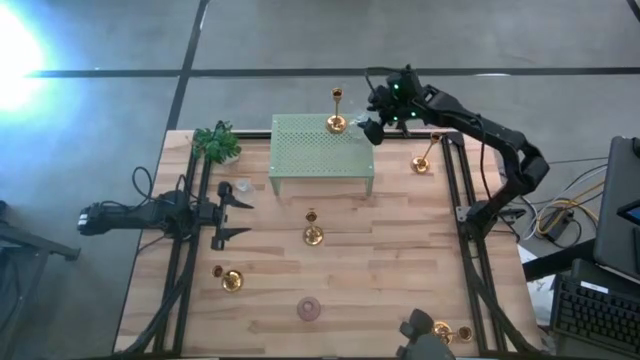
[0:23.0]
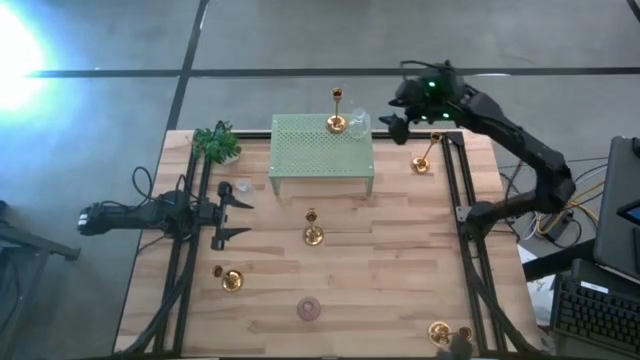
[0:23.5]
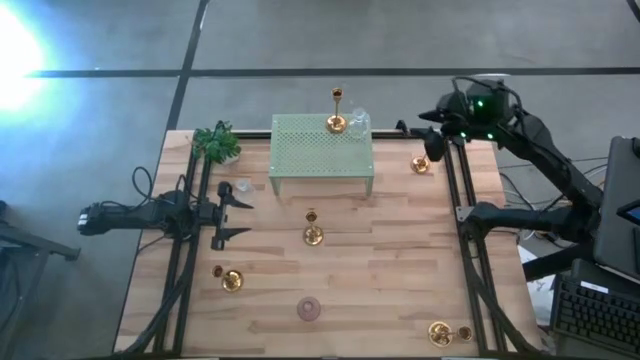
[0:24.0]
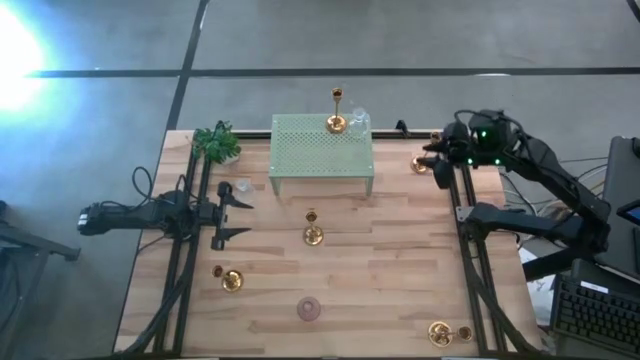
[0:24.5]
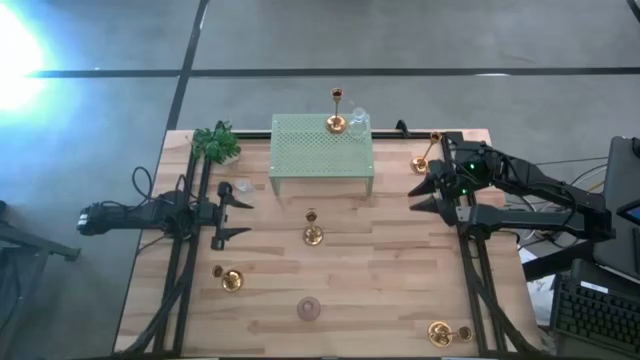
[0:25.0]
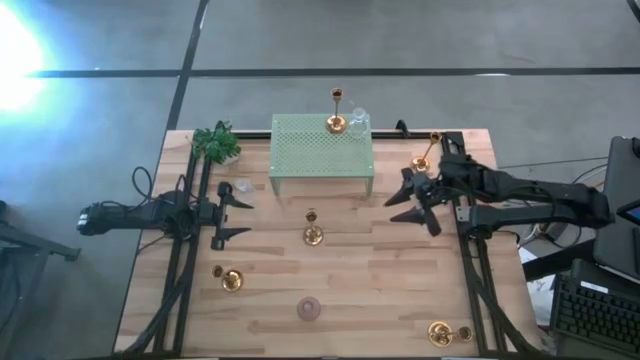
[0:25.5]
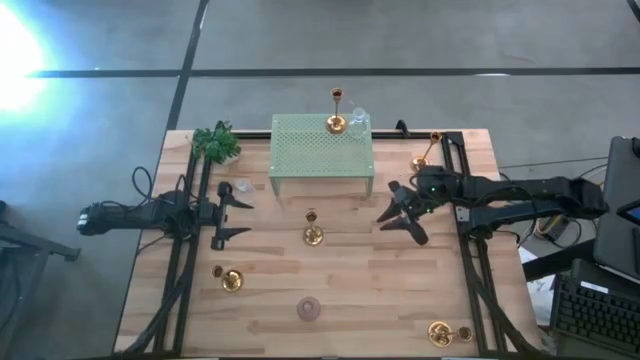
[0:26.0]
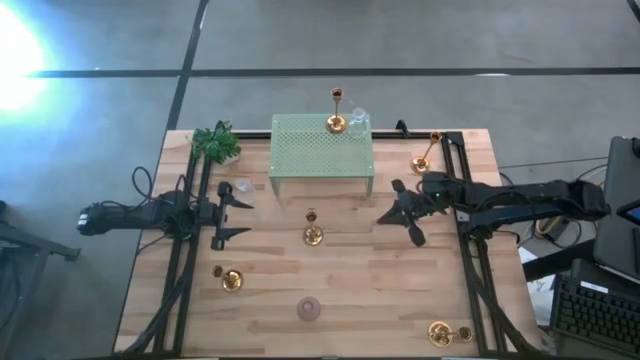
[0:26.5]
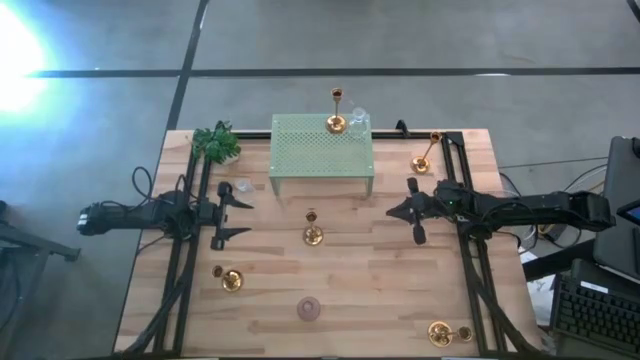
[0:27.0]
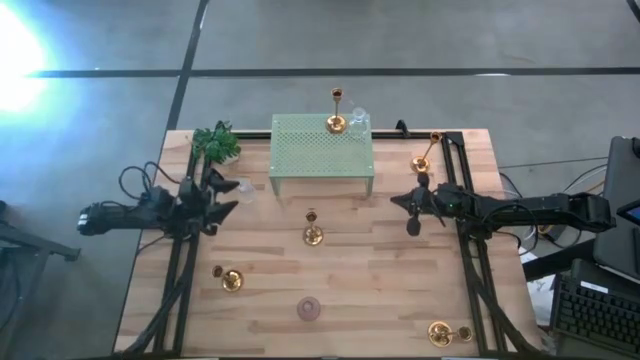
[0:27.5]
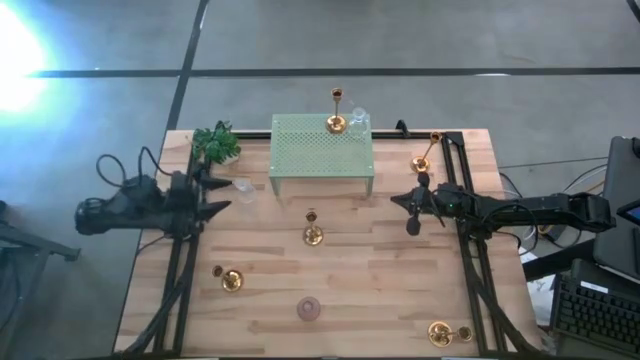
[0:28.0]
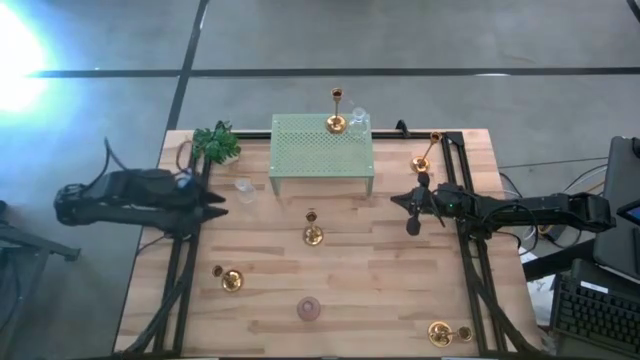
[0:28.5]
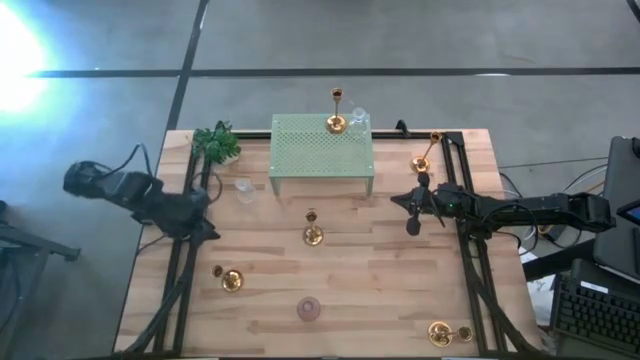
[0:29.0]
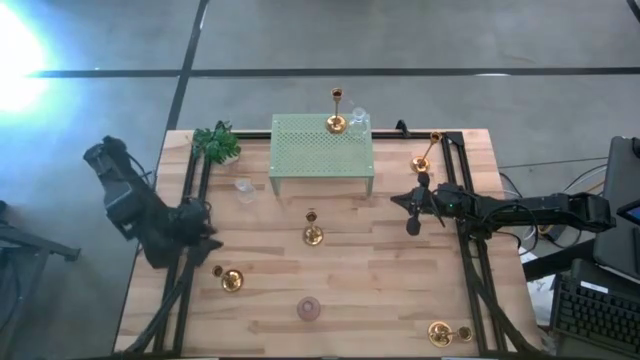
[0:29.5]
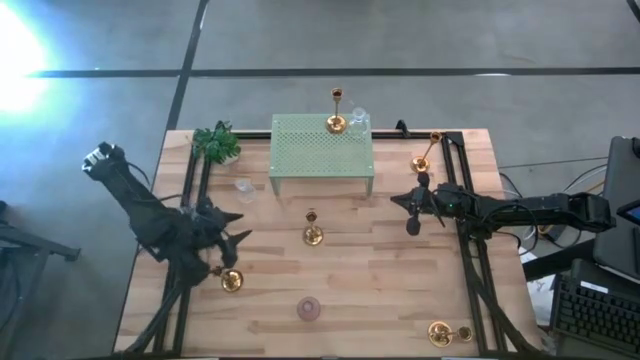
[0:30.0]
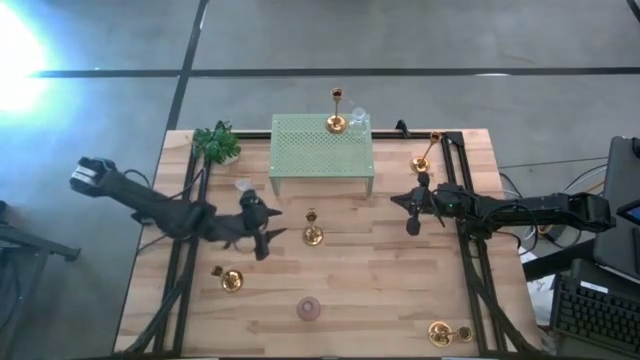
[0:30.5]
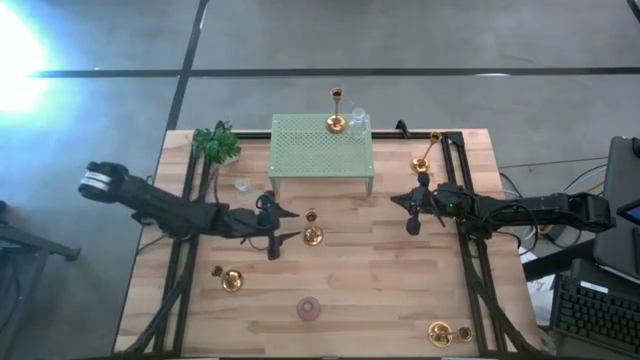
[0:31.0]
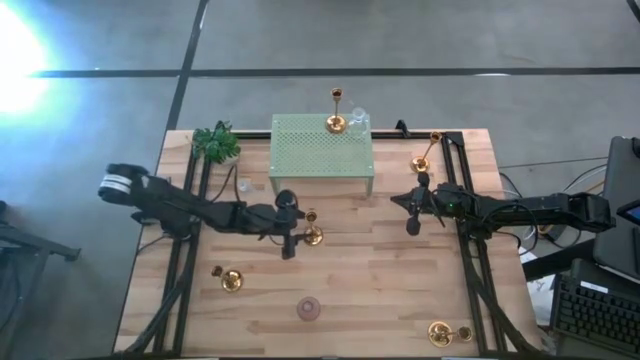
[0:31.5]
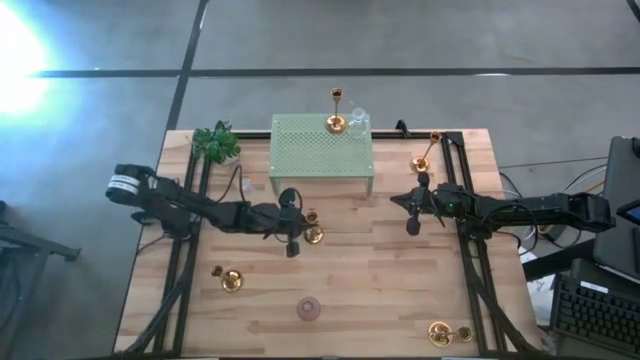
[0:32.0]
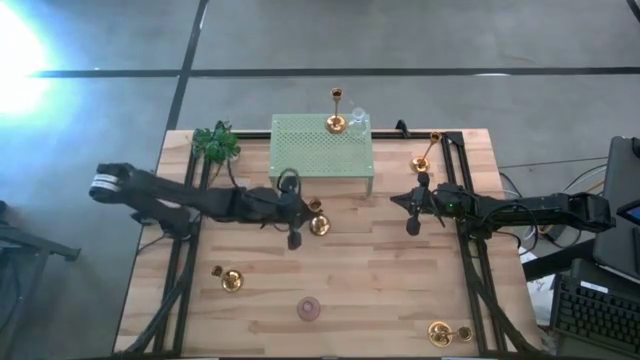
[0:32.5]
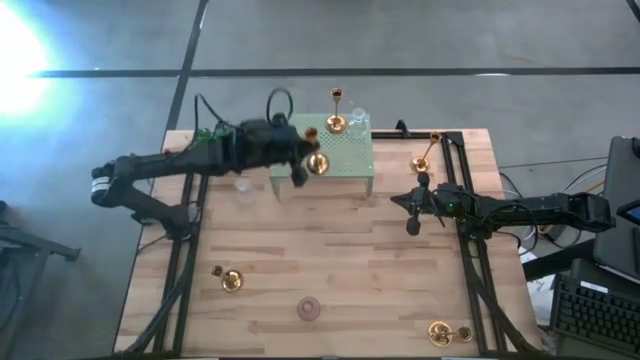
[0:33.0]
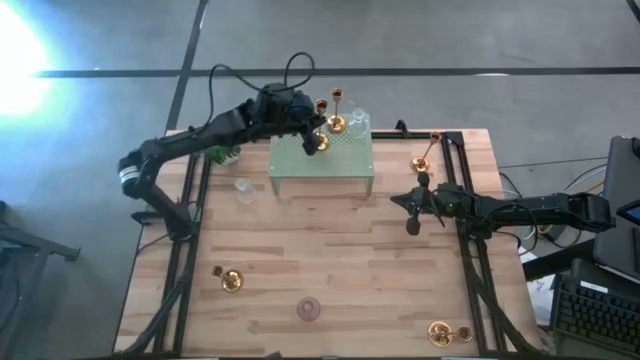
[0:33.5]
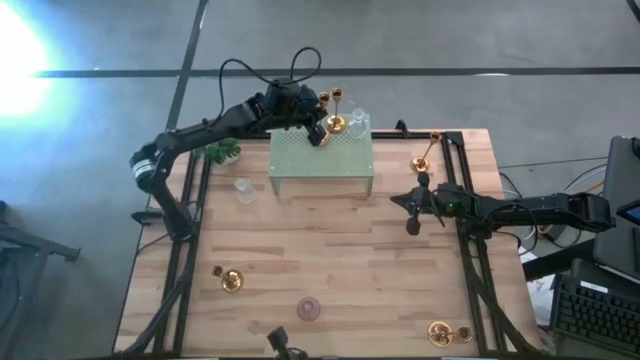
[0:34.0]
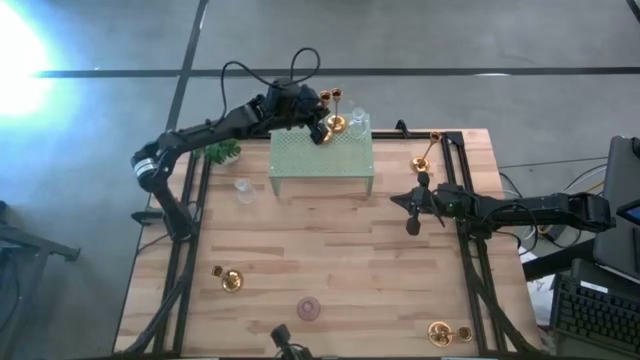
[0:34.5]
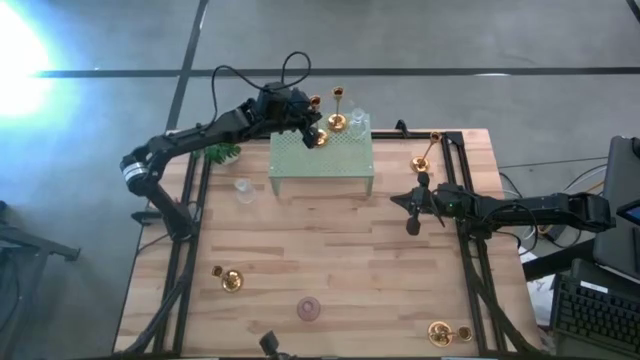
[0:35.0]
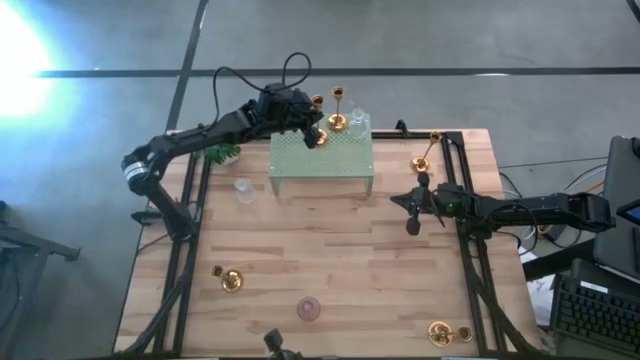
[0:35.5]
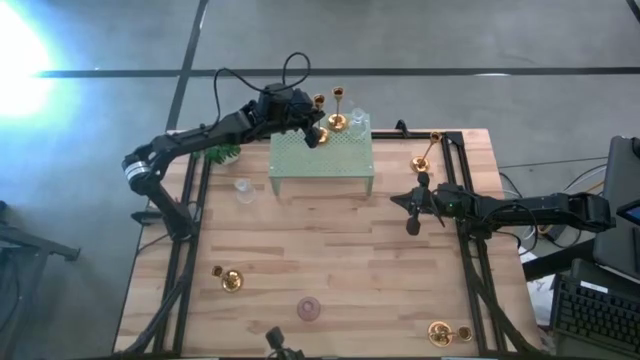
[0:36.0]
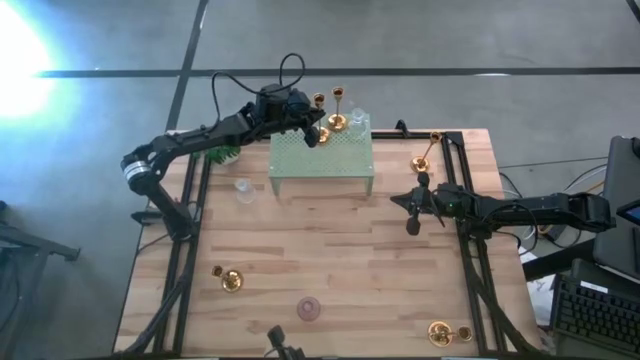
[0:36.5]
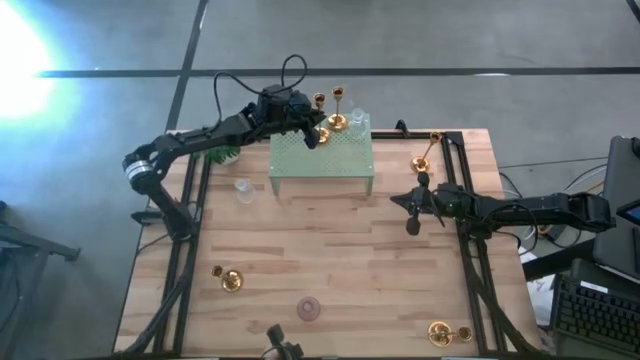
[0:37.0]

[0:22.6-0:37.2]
Task: Pick & Place candle stick holders
Put the gold candle holder on the shelf

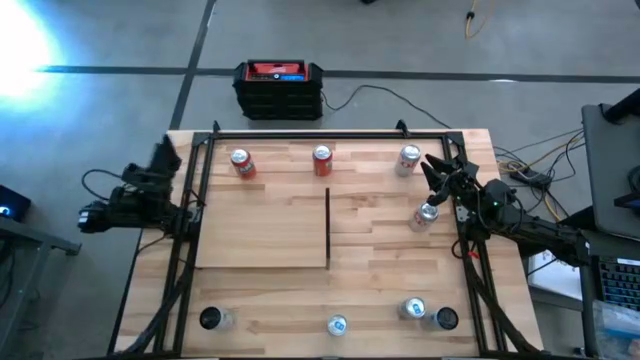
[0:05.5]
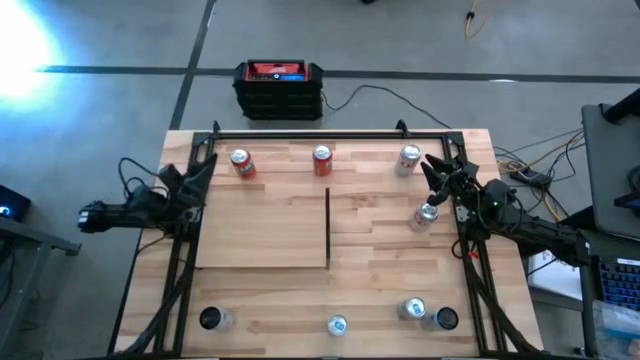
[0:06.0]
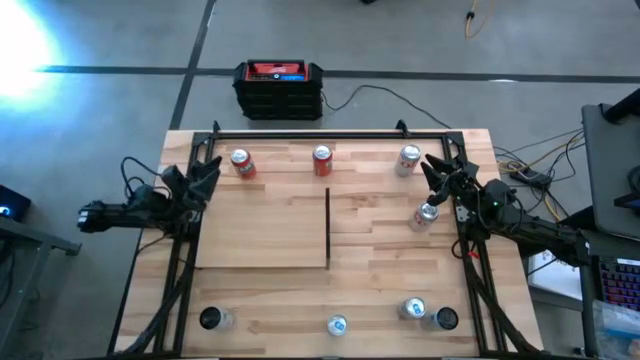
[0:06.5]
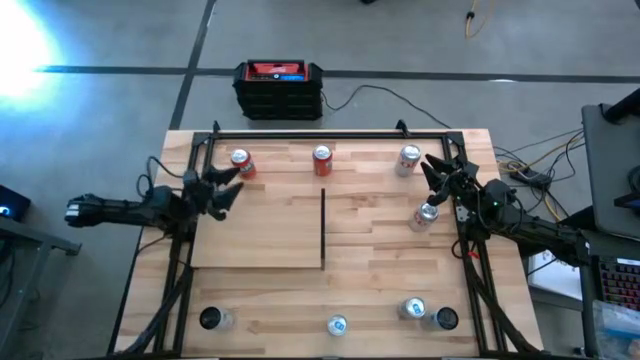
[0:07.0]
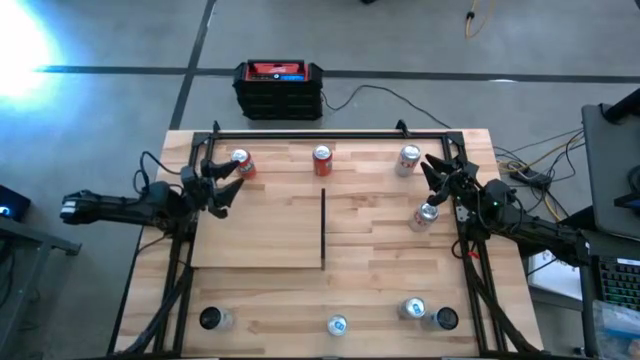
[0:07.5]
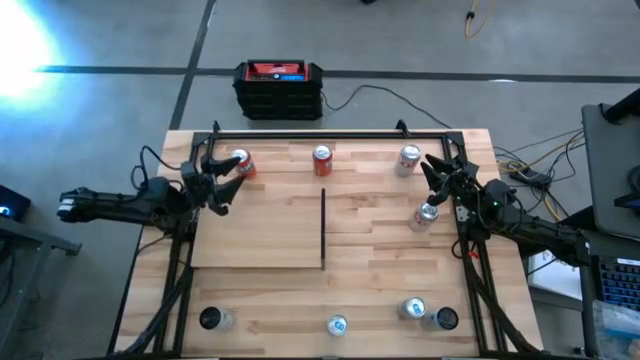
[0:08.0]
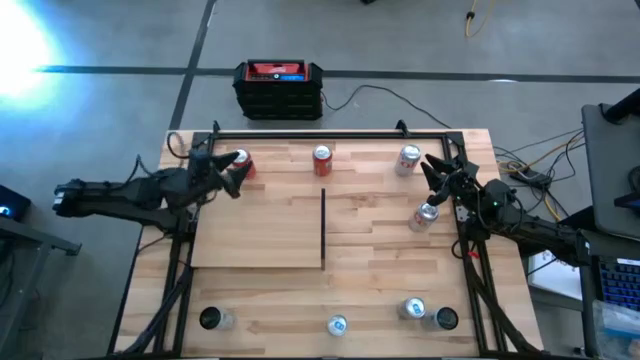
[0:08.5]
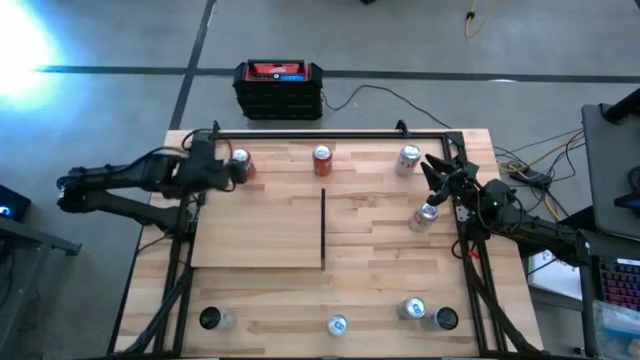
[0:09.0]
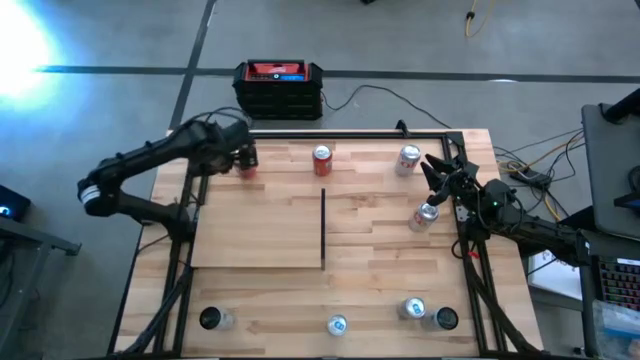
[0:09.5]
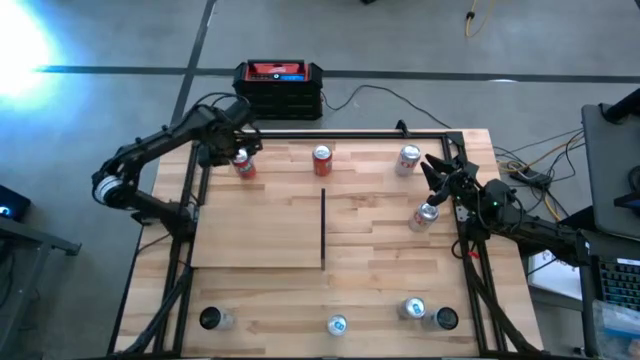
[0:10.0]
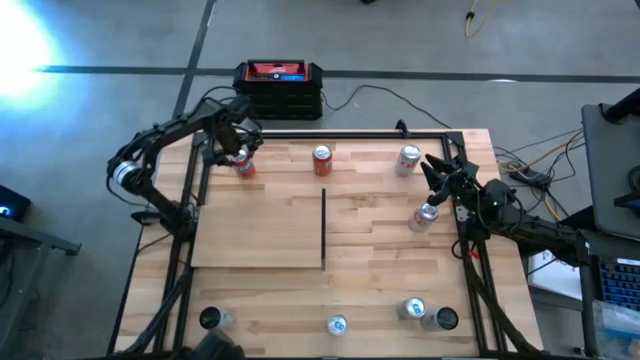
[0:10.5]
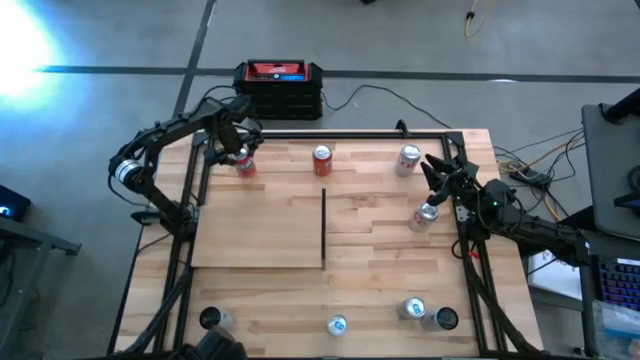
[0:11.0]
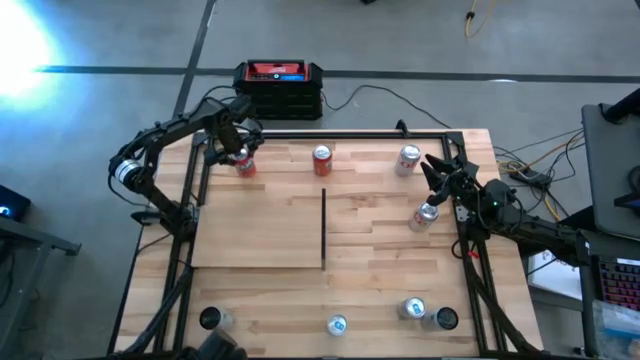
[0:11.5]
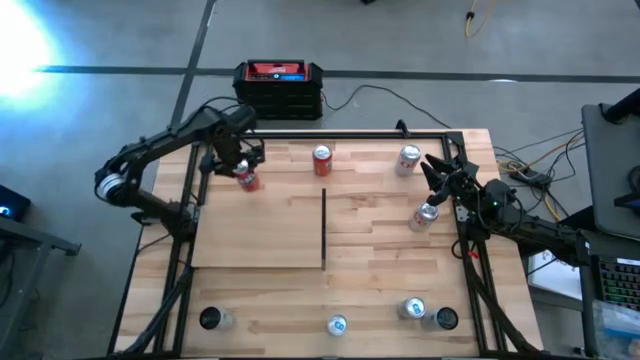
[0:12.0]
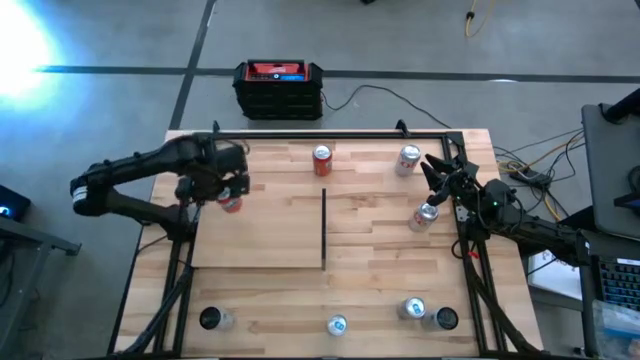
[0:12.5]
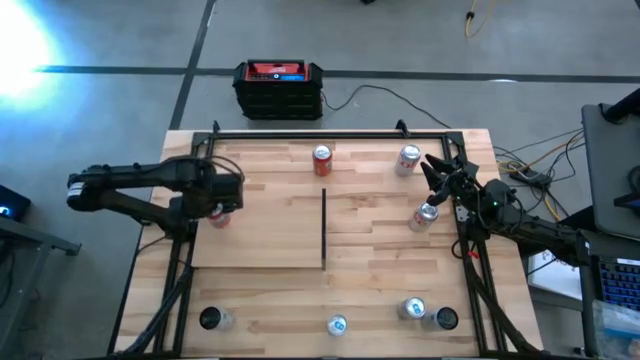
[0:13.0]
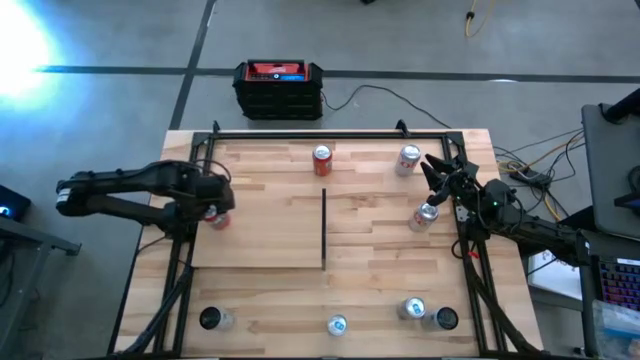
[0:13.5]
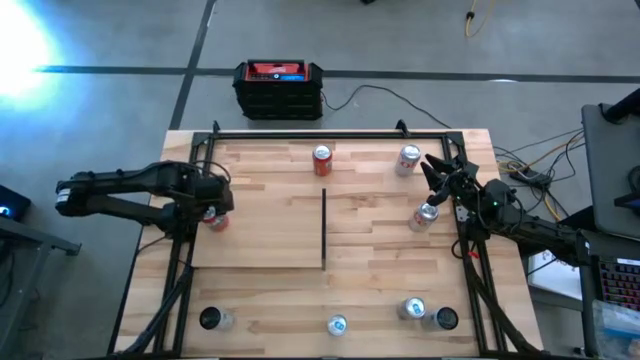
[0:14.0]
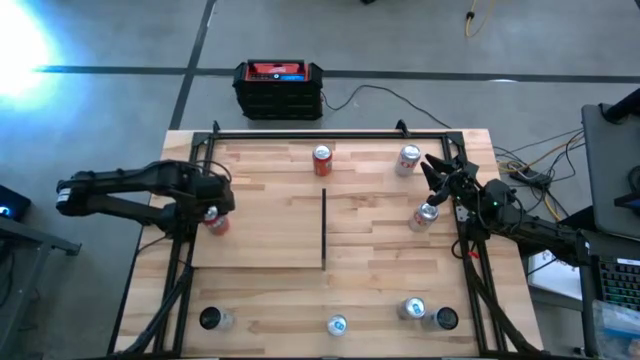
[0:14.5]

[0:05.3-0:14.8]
Task: Place canned beverage on shelf
Put the left red soda can on the shelf
